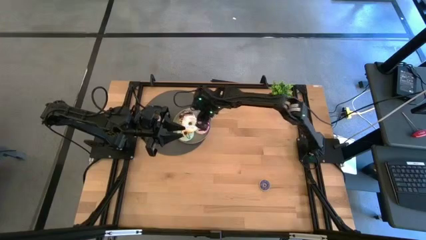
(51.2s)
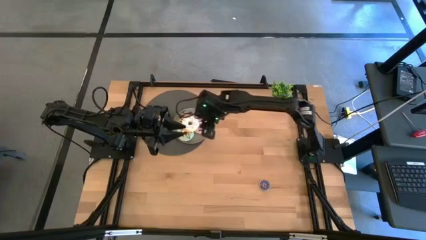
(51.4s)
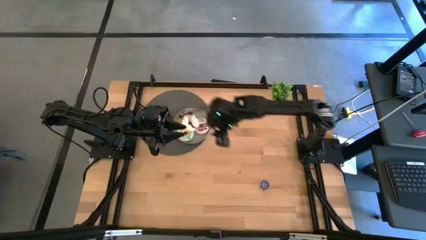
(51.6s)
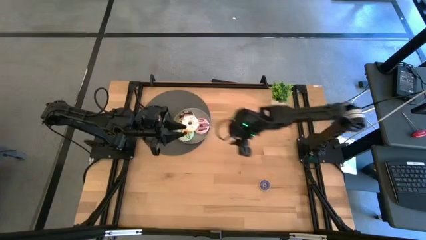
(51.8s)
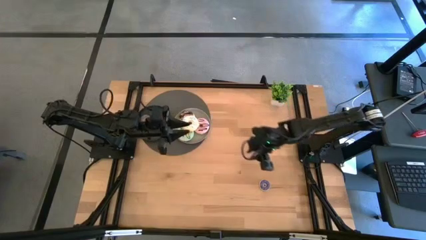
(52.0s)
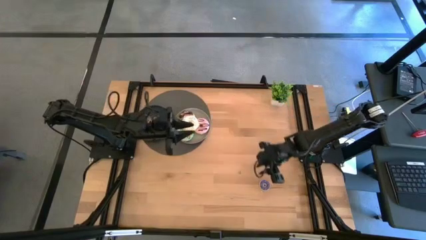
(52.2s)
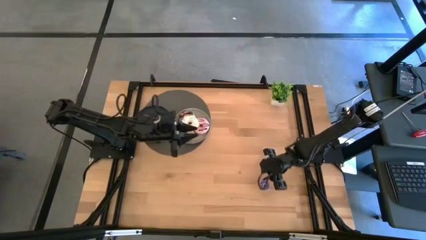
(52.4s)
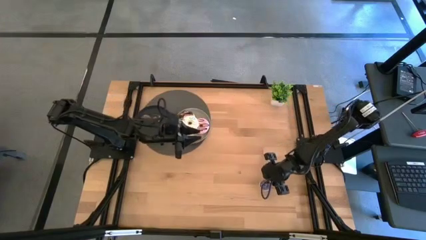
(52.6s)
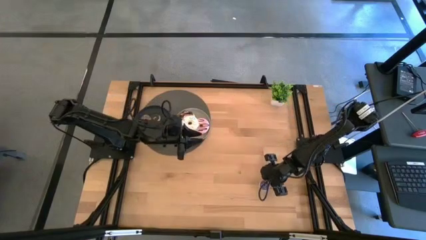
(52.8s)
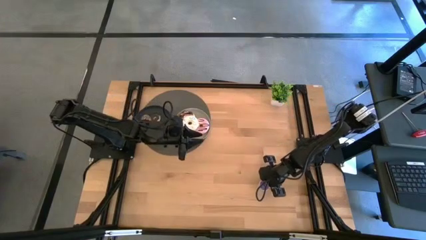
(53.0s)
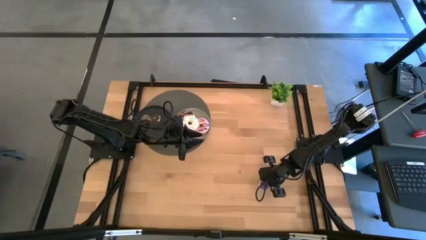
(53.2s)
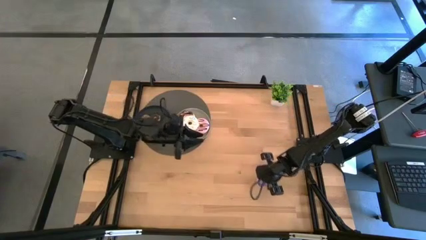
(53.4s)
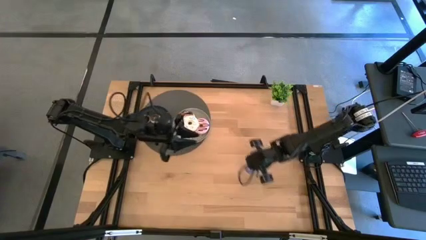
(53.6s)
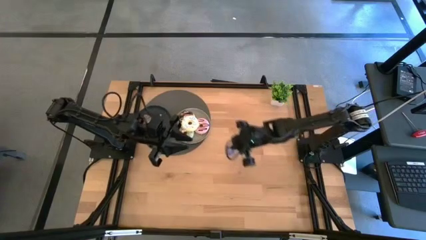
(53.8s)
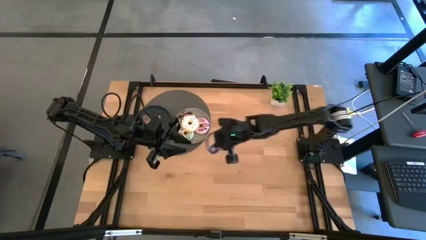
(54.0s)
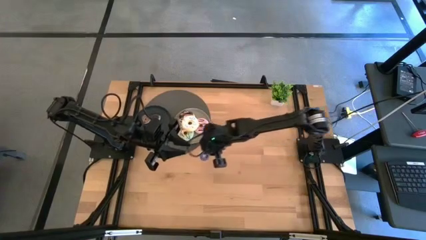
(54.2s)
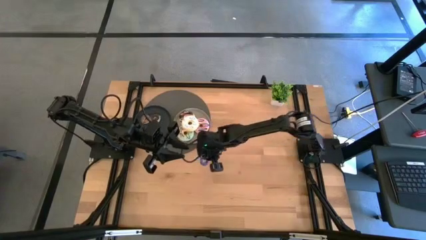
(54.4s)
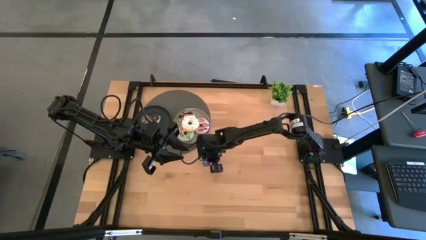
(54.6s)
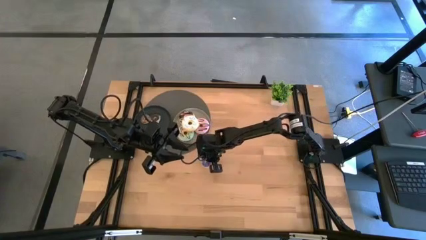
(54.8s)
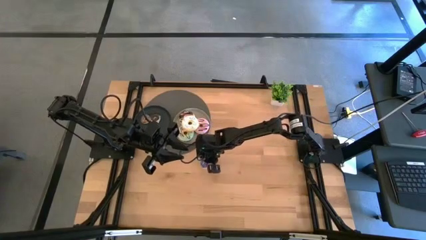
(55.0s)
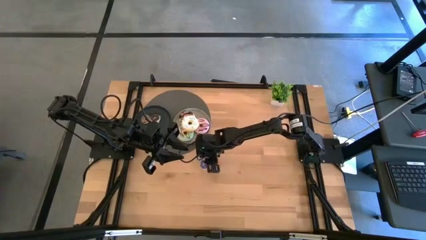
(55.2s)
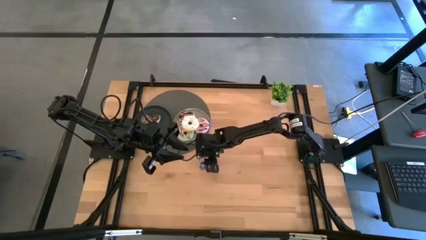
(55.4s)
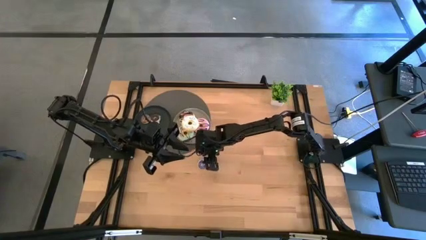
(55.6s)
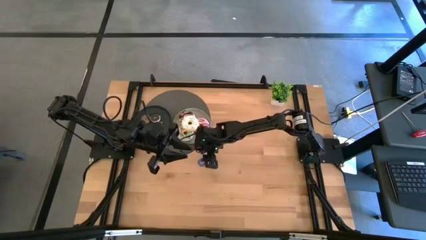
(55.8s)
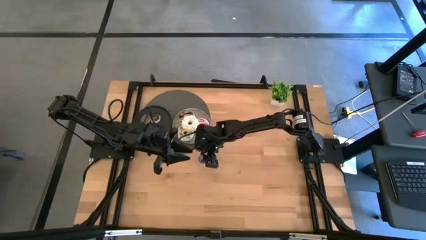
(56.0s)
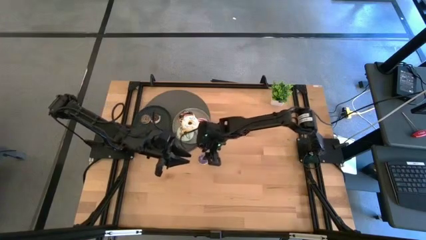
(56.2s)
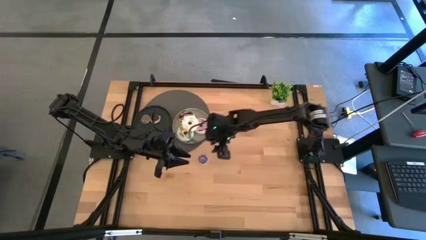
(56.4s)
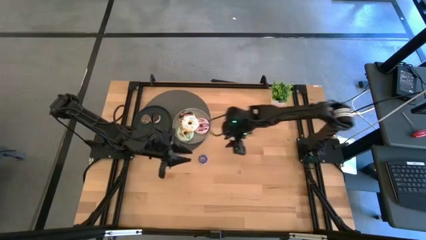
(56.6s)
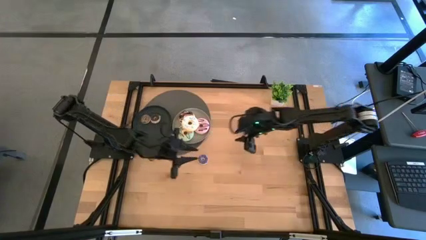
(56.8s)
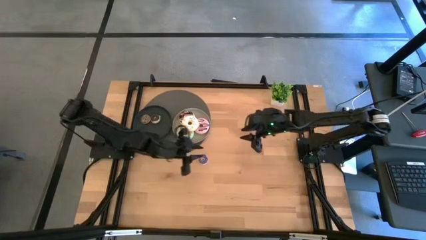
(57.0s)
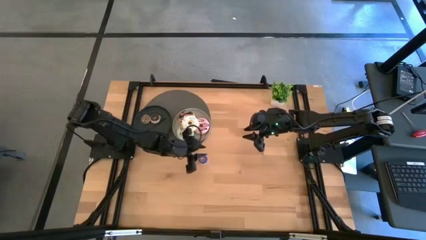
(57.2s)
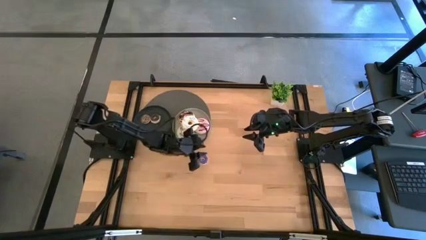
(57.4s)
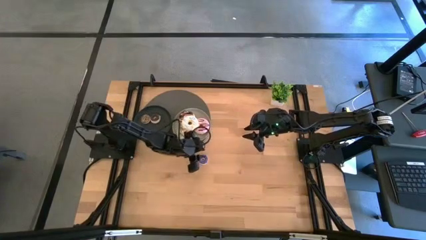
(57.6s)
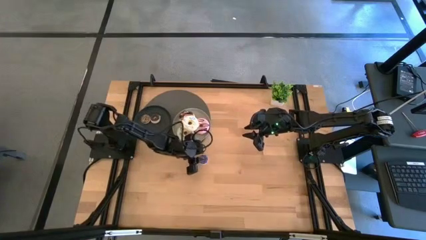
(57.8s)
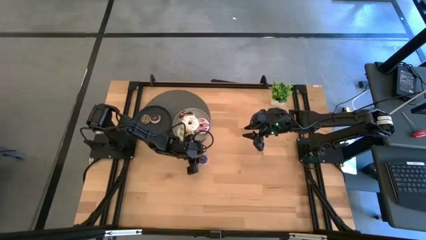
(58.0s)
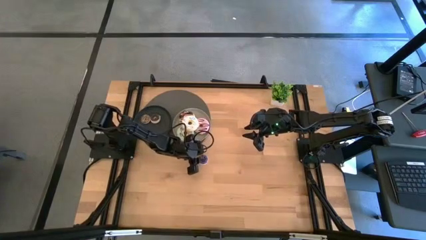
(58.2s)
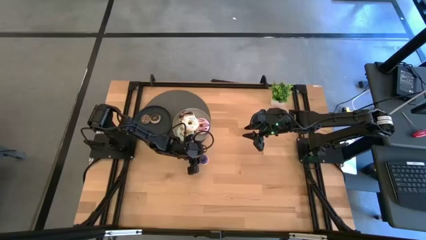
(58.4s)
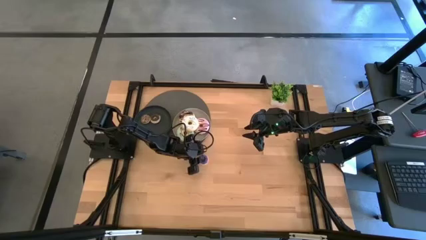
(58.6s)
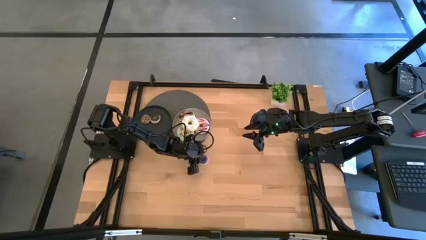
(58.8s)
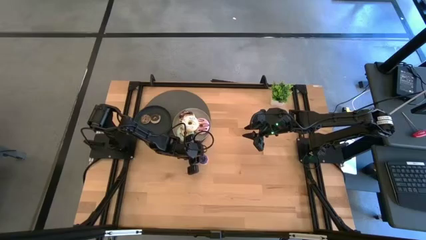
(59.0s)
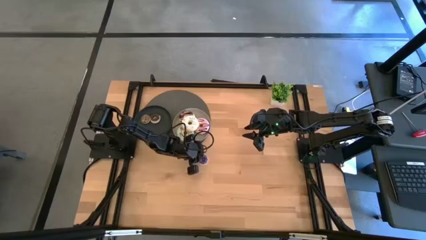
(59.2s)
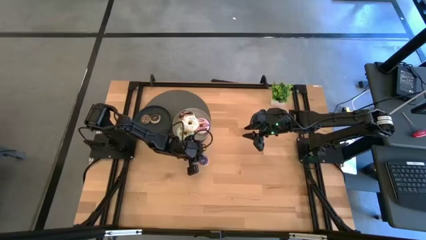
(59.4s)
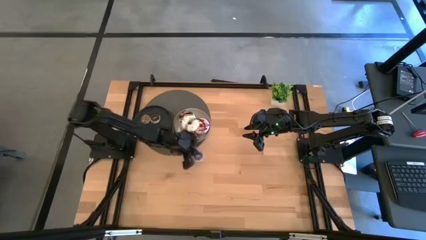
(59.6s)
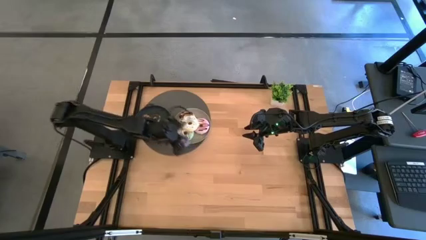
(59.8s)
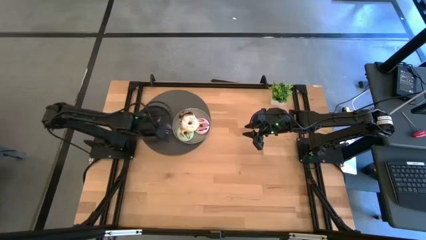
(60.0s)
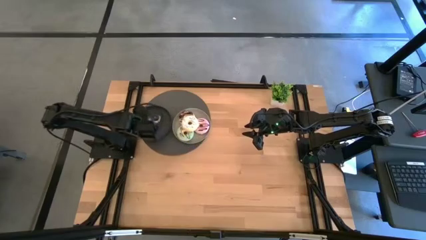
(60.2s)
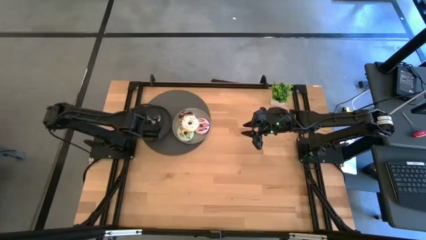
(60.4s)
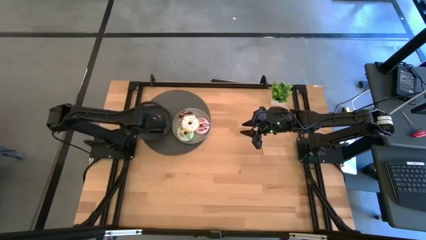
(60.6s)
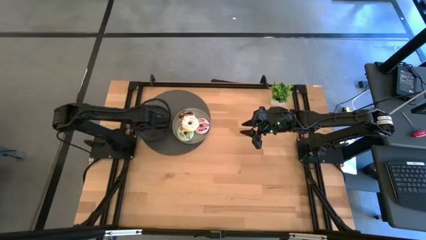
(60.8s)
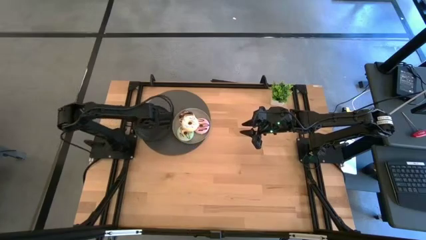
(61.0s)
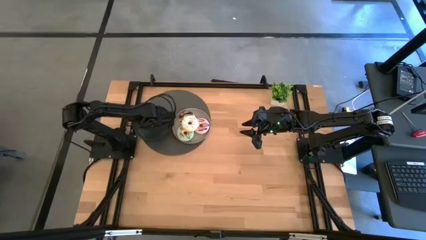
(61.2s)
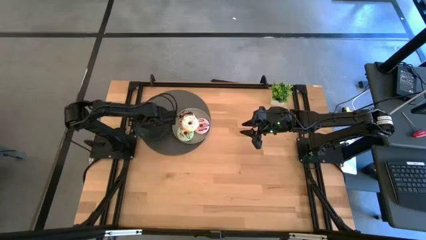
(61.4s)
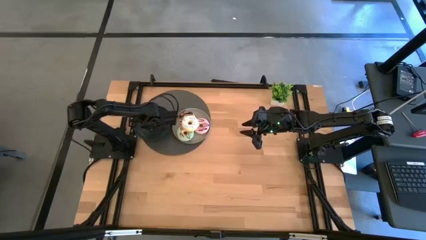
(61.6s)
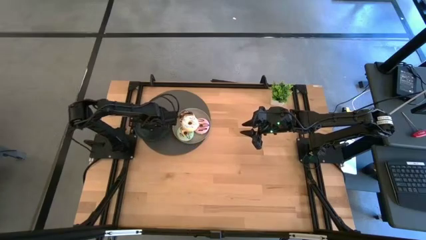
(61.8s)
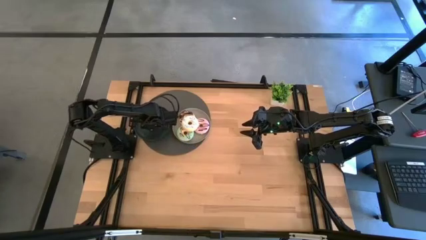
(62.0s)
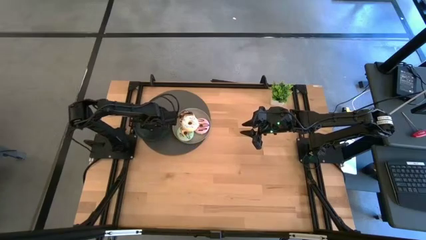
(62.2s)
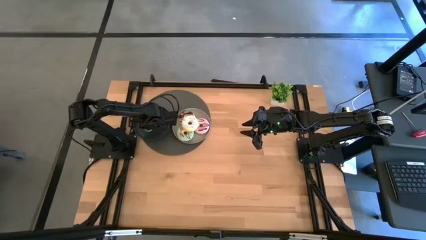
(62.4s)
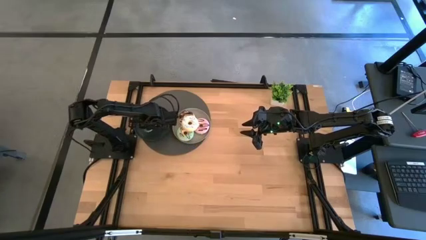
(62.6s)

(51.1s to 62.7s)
Task: Pick & Place donuts
Put the small dark blue donut on the black plate

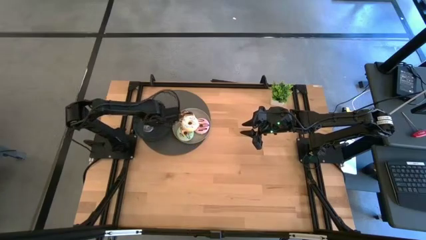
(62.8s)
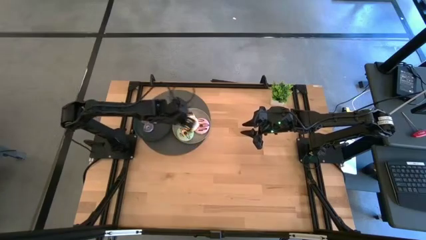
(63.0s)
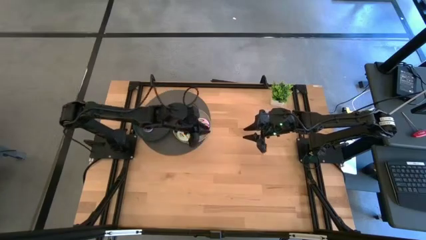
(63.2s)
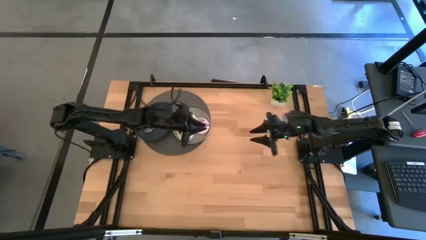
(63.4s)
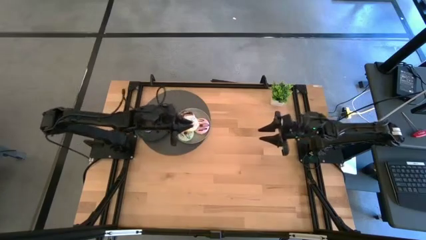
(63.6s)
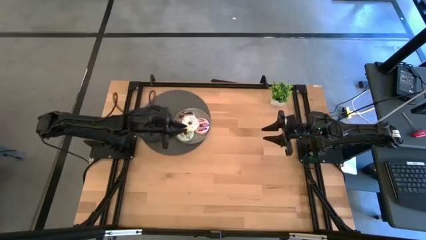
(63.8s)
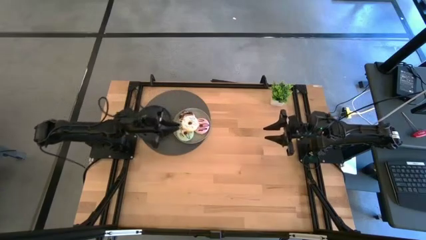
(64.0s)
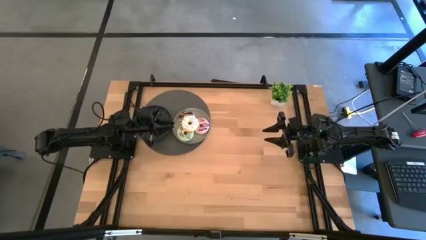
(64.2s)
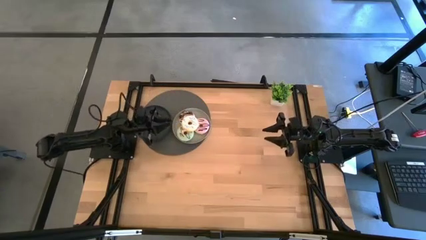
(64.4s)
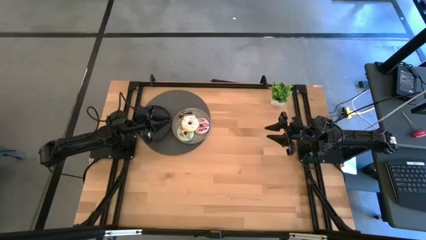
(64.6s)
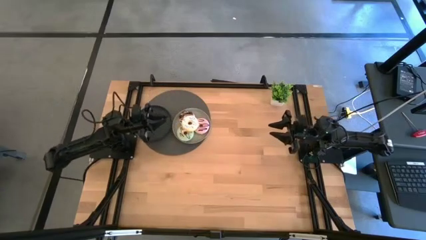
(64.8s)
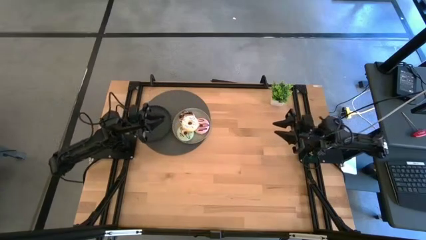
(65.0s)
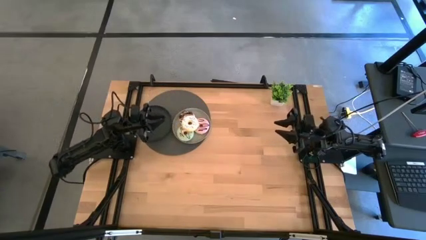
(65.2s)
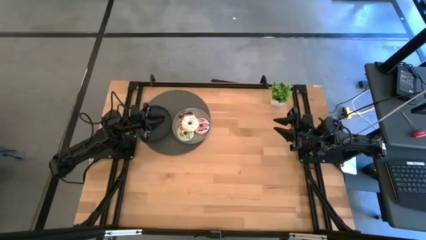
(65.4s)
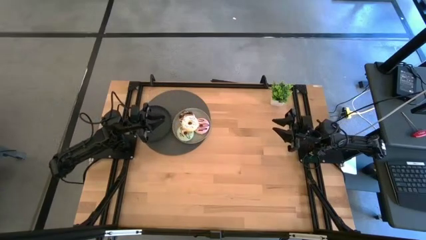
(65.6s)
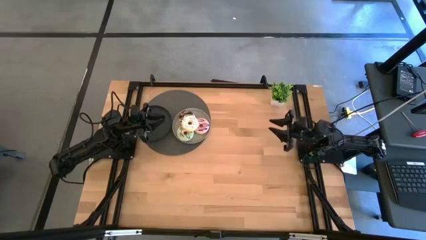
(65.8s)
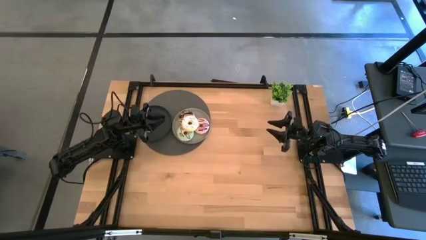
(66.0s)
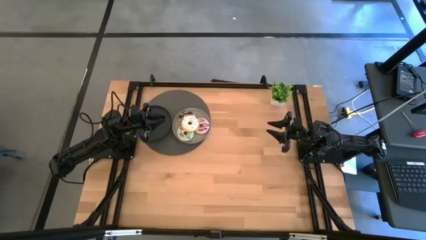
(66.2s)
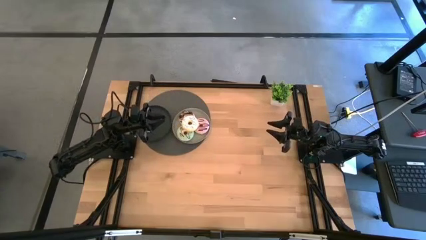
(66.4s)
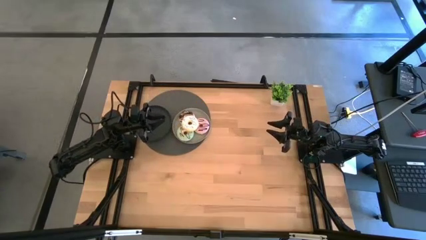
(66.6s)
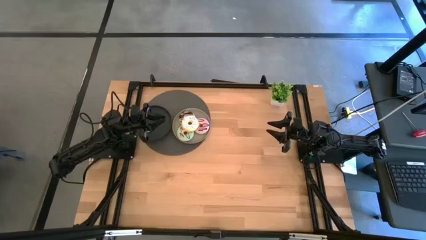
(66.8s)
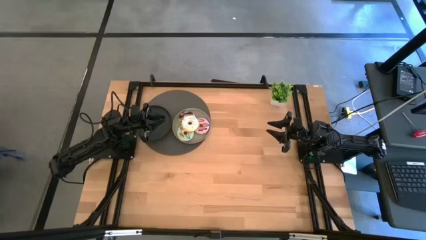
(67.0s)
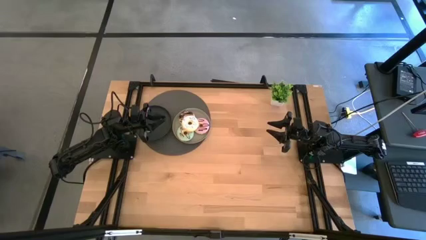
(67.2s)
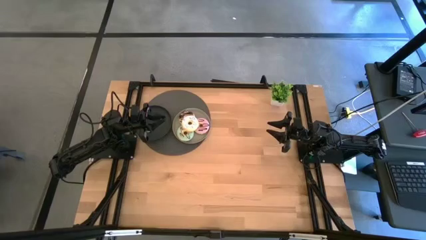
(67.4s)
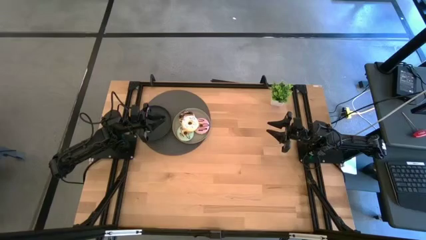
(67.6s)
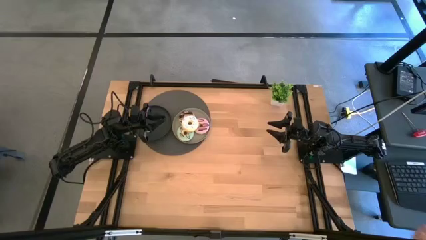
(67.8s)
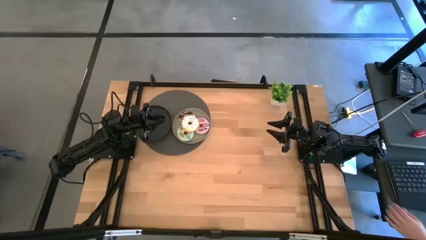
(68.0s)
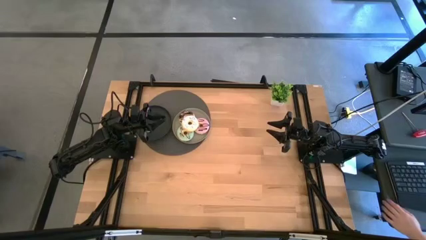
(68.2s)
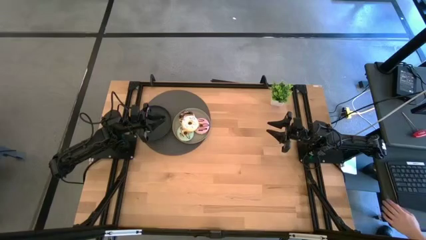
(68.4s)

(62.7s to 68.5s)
Return to Home Position
